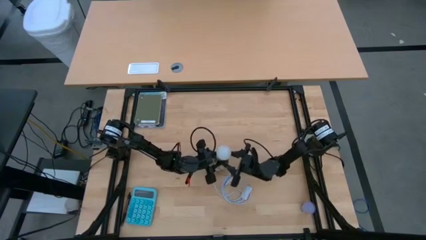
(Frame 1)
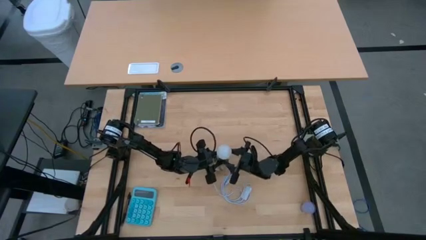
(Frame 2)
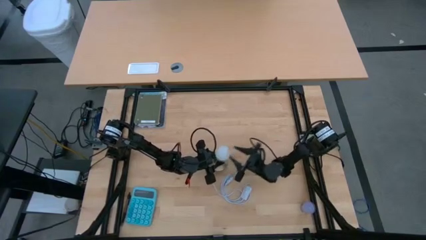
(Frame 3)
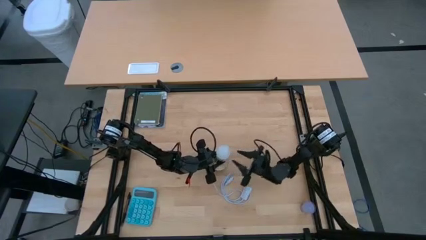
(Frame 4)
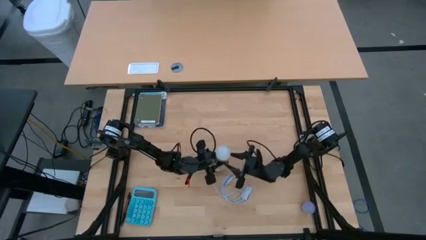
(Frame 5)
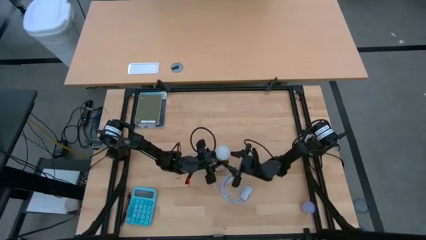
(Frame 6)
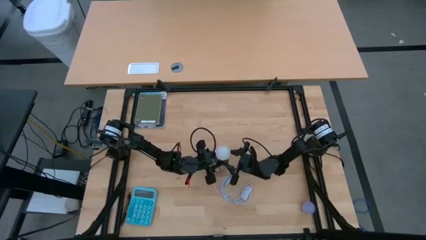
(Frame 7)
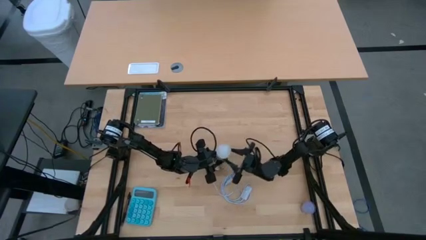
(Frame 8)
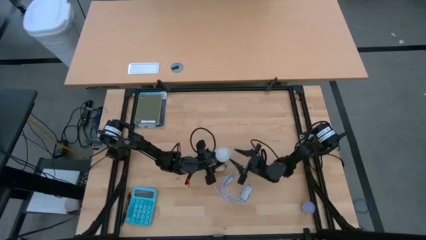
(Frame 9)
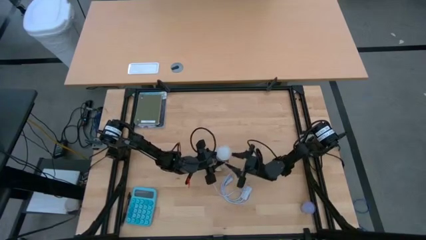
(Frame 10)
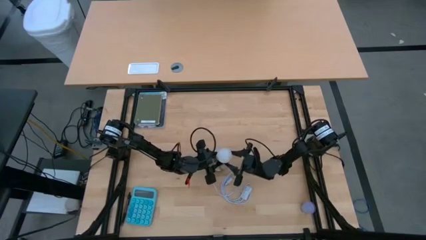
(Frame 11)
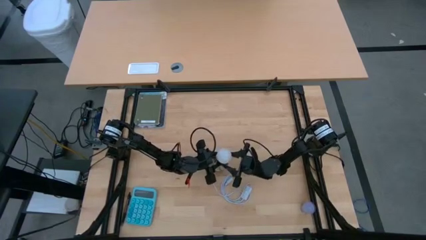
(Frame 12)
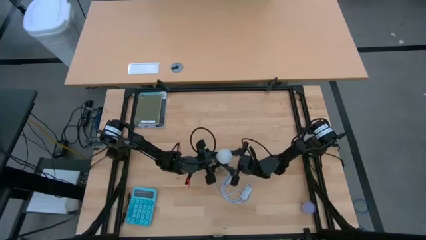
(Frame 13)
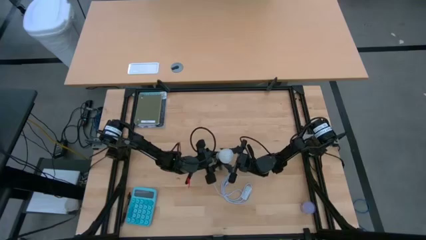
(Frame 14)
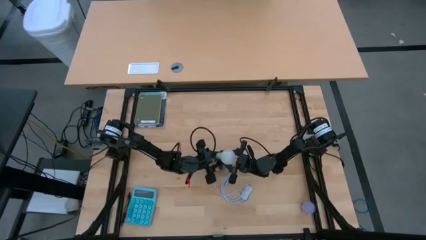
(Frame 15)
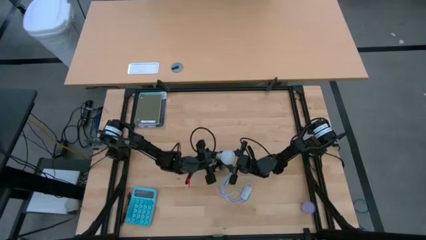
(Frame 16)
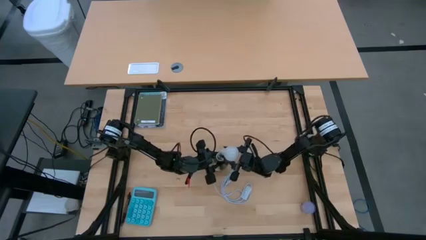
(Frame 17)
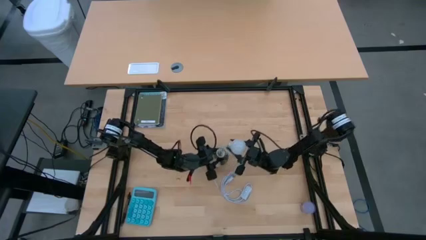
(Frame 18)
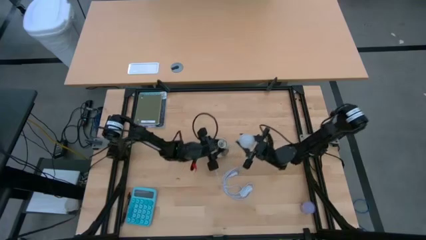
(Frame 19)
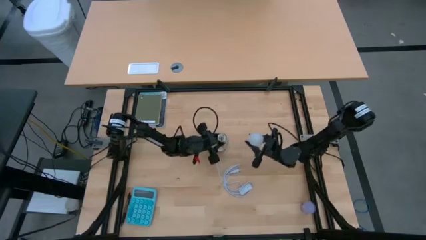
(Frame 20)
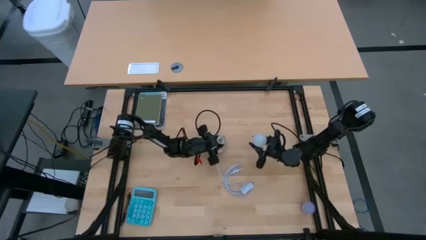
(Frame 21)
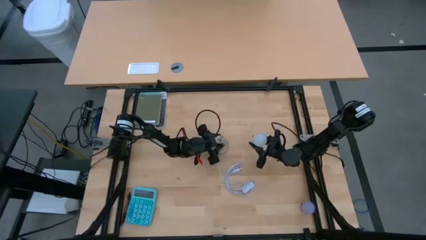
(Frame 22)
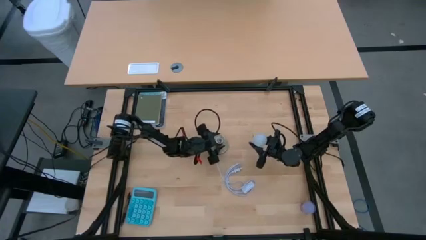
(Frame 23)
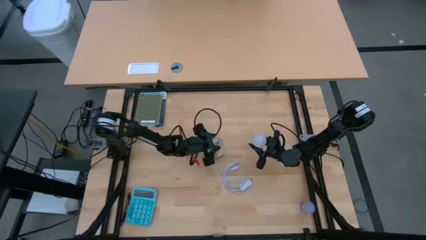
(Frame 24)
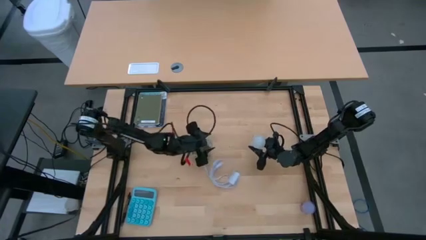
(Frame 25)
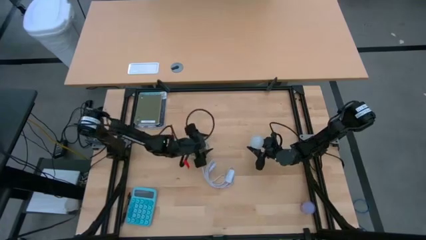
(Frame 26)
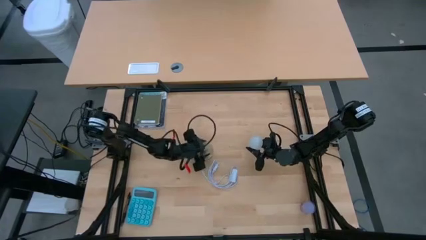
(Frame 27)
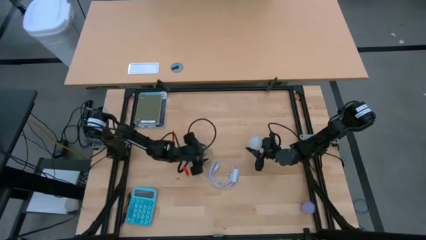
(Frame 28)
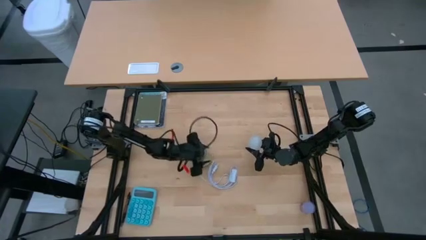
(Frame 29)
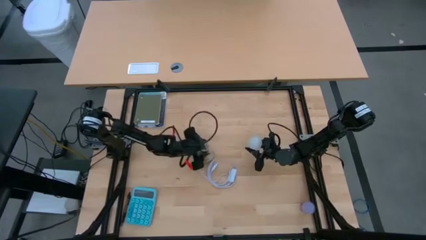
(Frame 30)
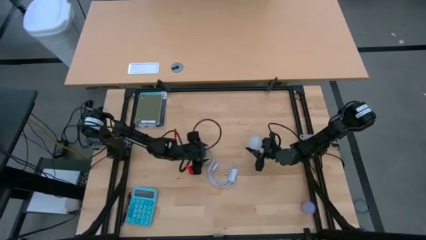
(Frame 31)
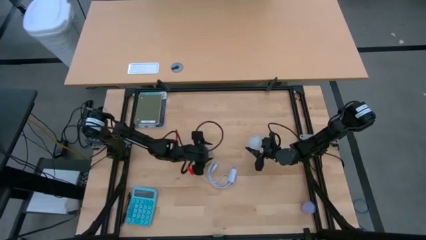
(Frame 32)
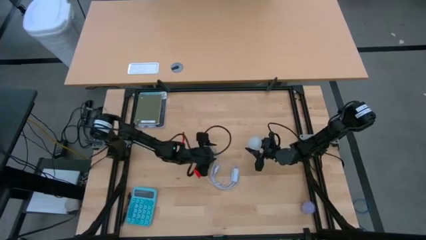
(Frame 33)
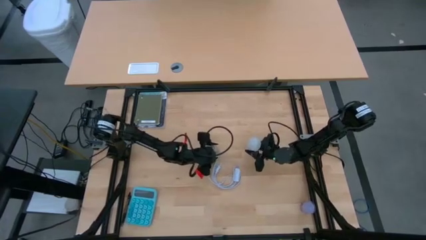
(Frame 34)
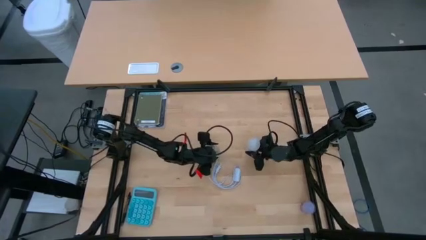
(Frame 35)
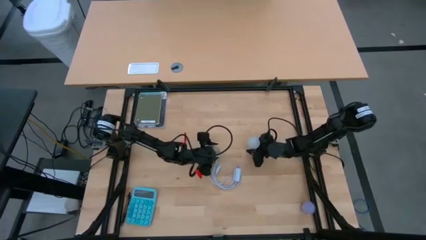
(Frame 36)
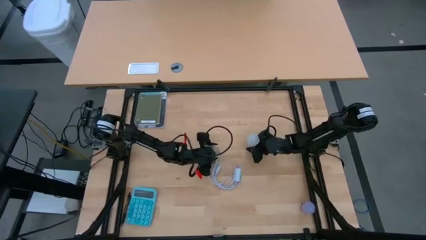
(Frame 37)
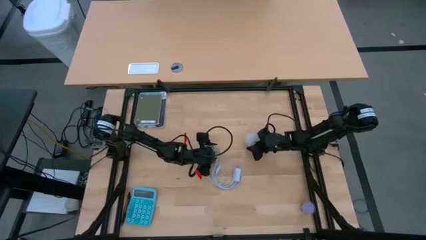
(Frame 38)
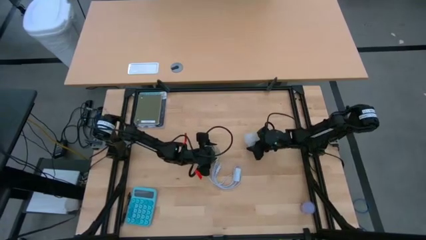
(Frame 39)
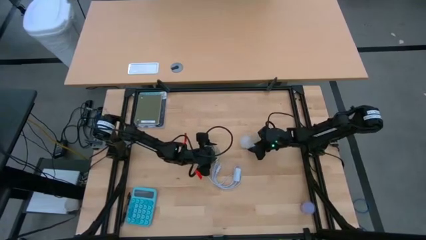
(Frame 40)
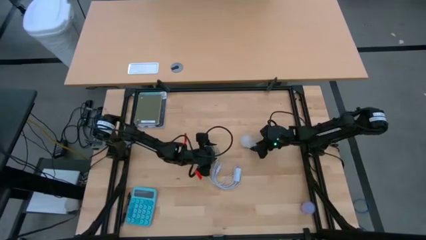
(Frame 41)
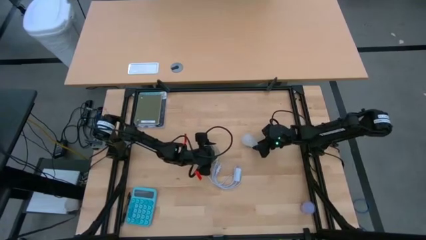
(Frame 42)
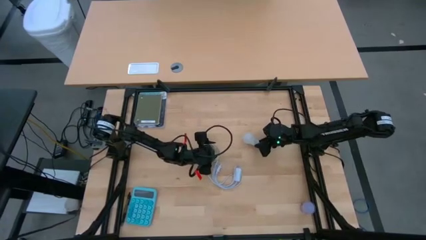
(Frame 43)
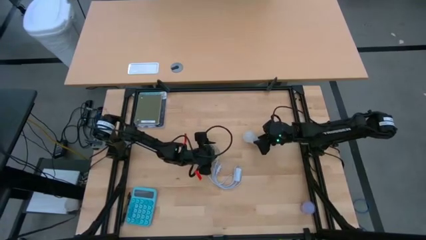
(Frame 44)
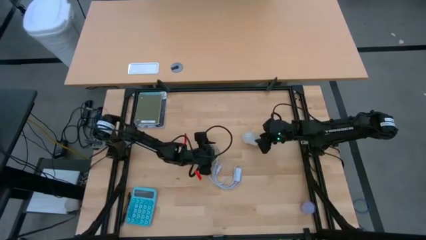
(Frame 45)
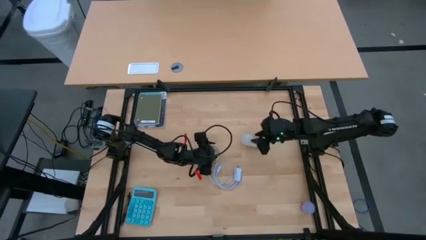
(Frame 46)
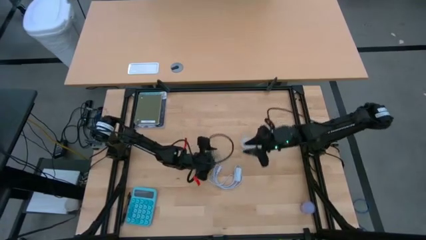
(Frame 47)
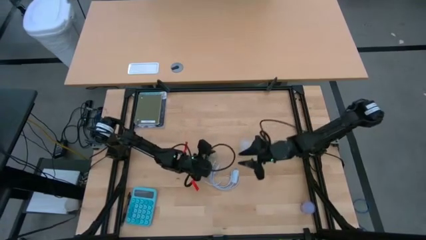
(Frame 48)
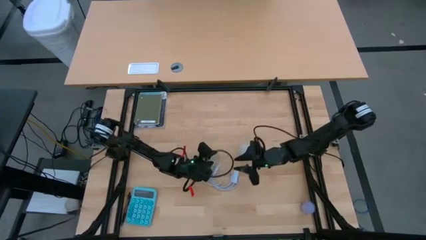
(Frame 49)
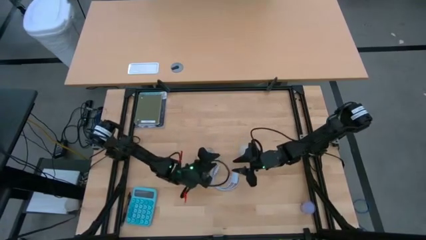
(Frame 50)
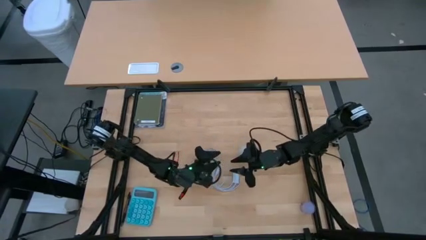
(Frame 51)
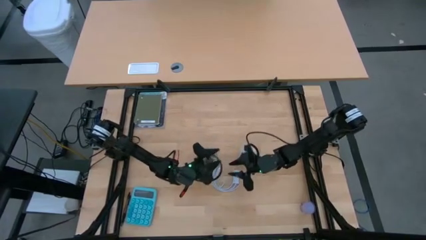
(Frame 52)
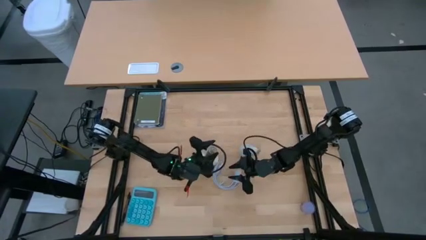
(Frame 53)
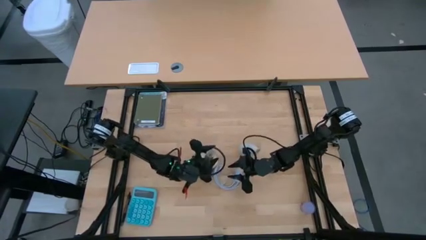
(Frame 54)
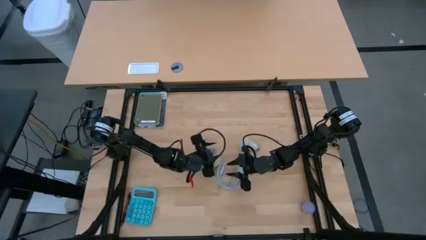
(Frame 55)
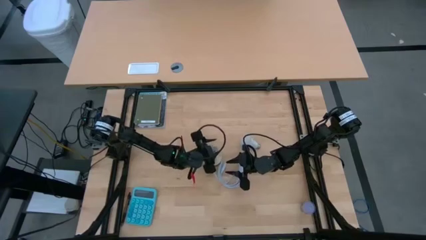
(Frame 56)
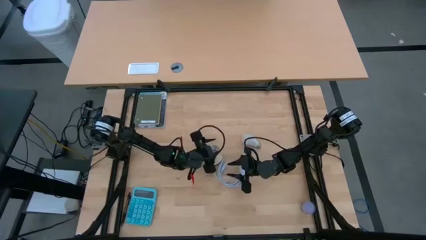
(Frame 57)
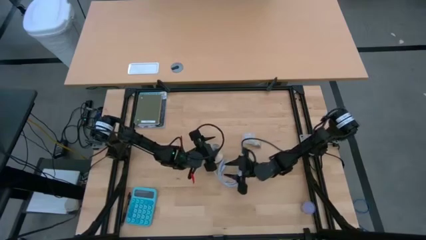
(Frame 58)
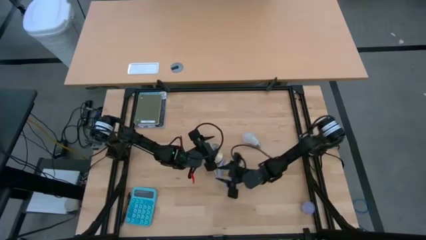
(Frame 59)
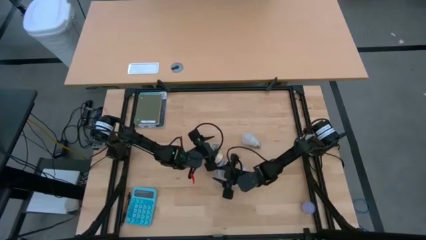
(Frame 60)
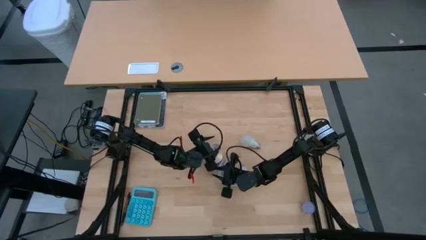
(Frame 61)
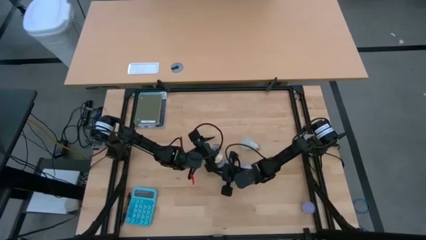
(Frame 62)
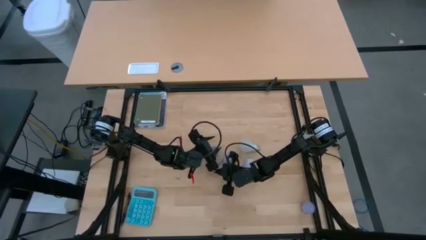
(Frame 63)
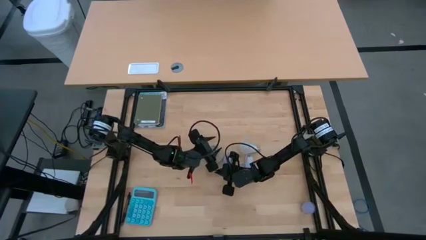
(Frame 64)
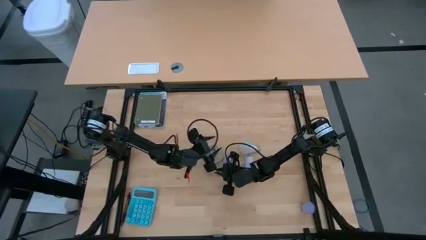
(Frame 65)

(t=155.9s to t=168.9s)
Task: Screw lightbulb
Remove the lightbulb from the desk lamp

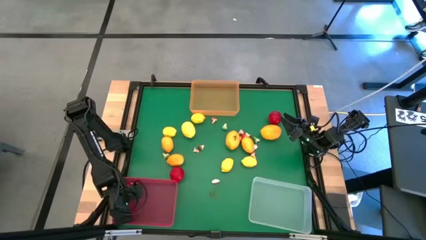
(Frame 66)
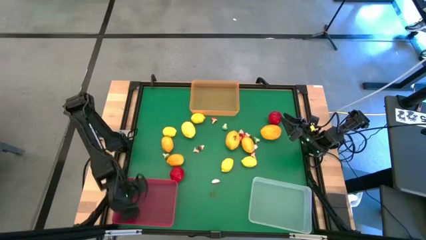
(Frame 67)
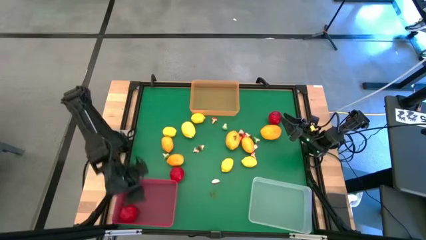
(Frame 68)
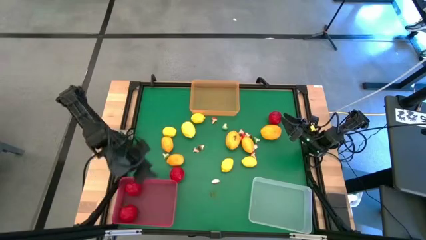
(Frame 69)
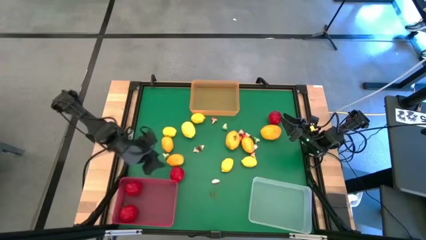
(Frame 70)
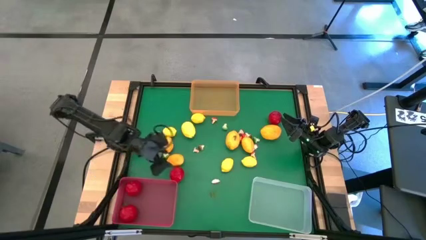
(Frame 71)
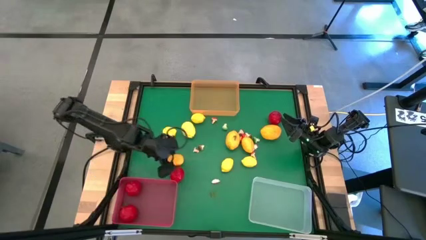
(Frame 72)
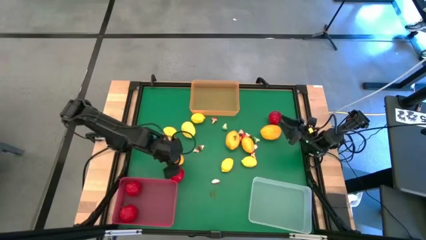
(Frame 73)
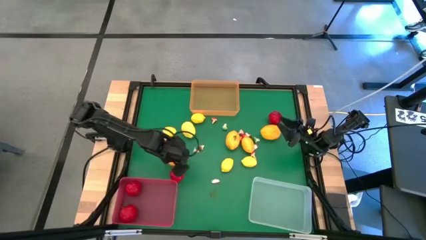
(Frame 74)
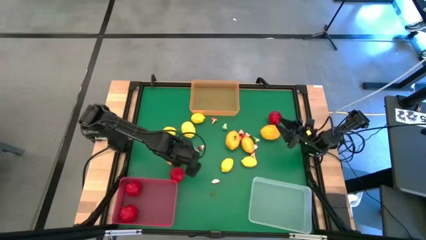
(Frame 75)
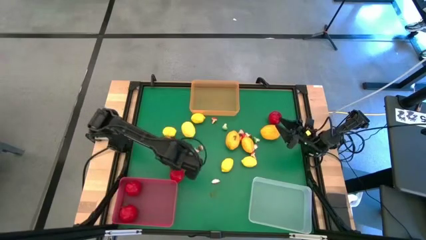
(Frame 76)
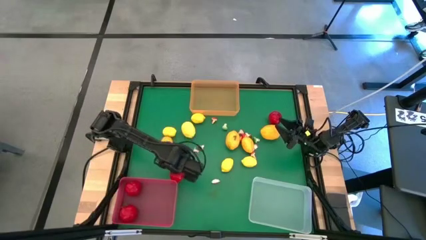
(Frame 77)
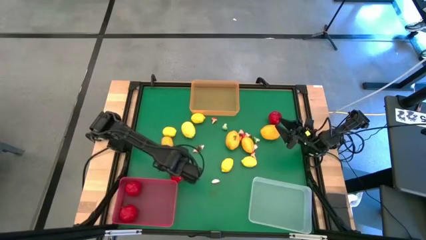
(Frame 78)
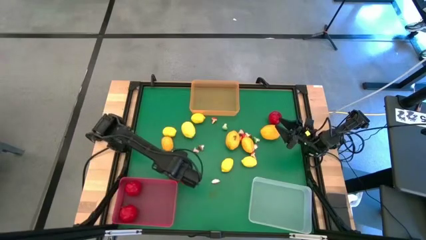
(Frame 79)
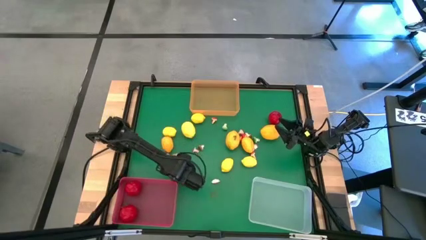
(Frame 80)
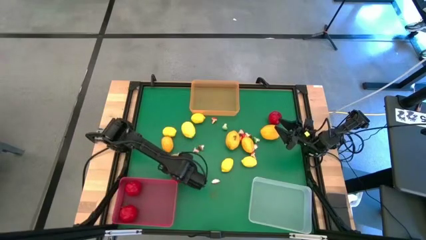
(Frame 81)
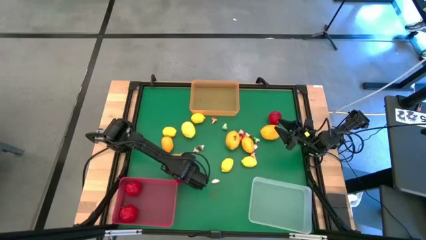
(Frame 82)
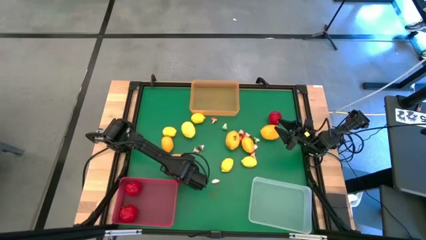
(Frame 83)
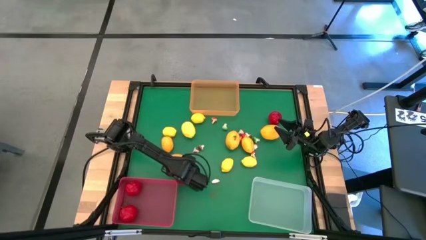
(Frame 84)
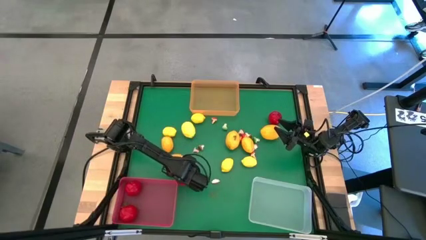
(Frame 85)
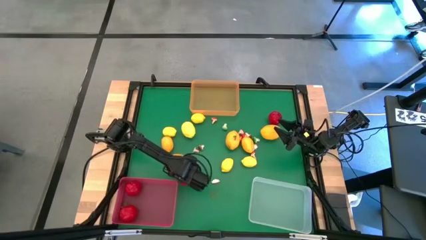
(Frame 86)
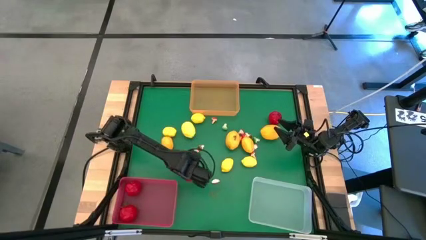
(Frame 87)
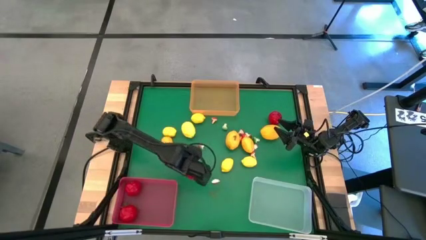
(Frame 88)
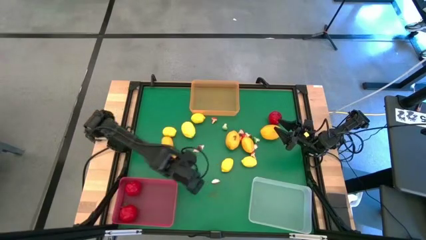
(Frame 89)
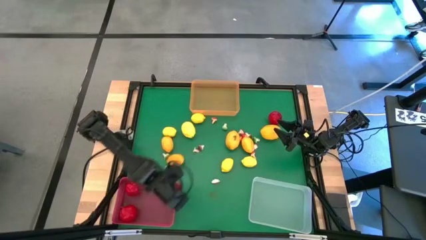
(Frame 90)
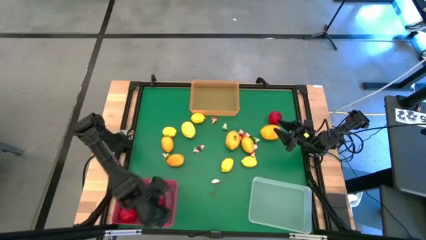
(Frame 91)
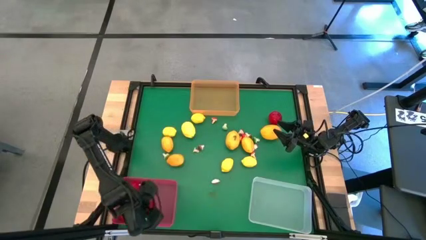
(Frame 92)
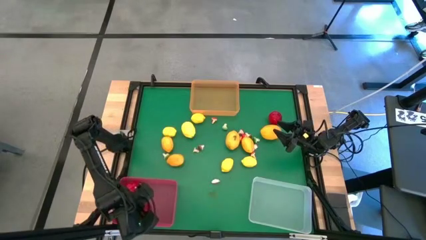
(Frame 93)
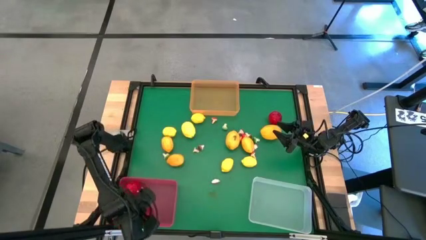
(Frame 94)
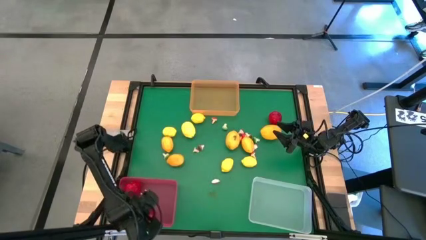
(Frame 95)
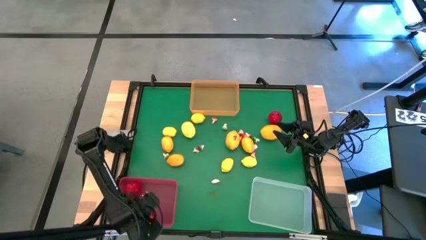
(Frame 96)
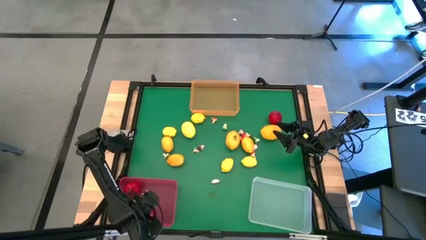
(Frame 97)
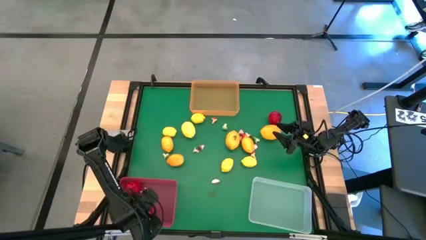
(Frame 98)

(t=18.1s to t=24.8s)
Task: Sort produce into baskets
Put the tomato into the red bin
